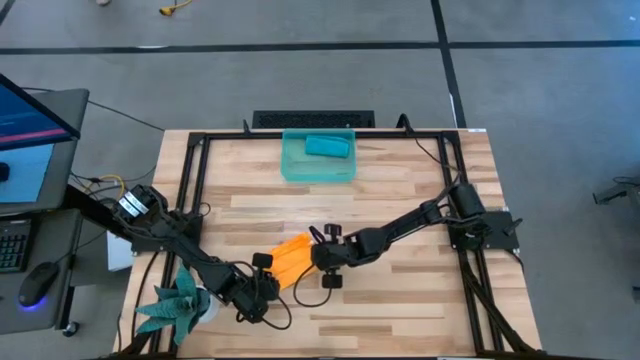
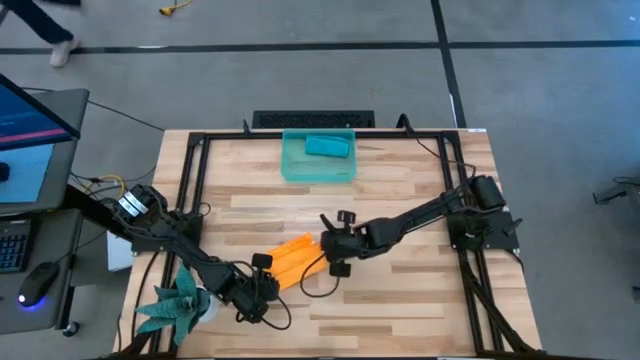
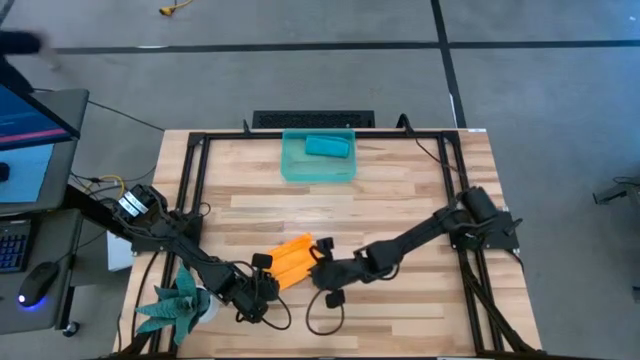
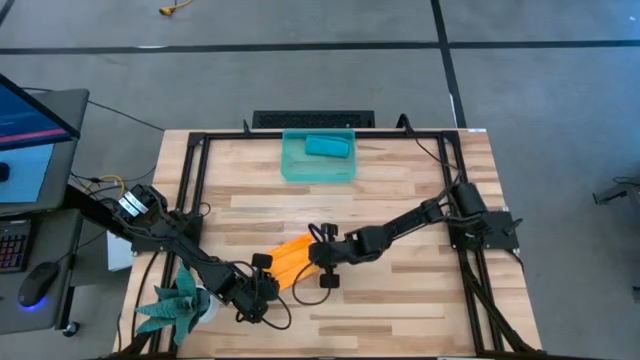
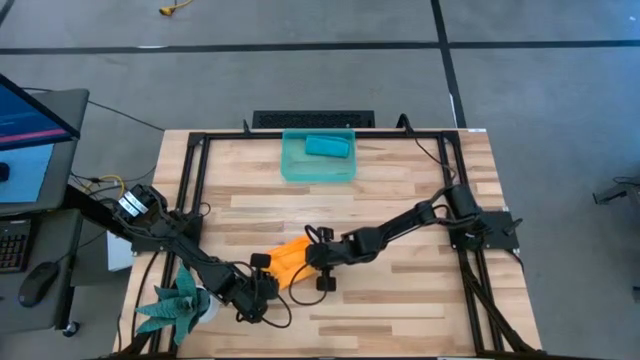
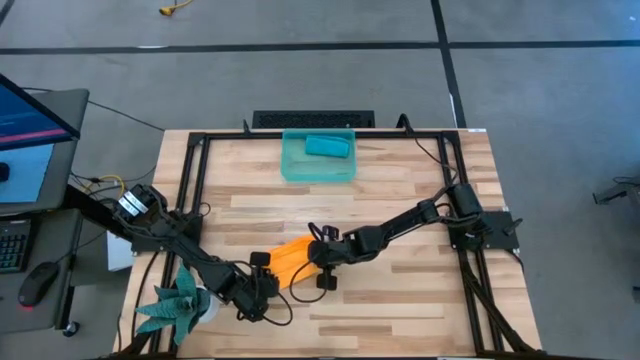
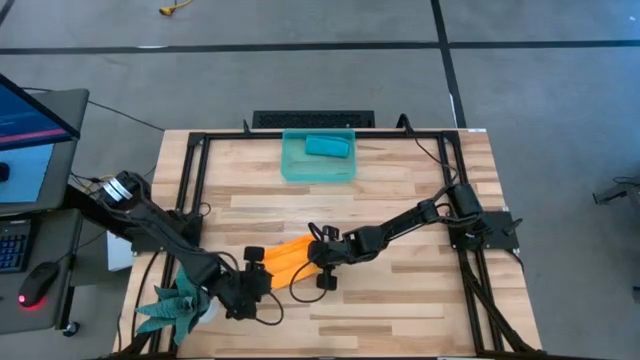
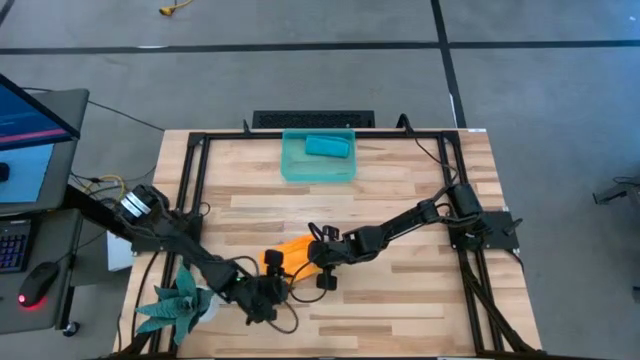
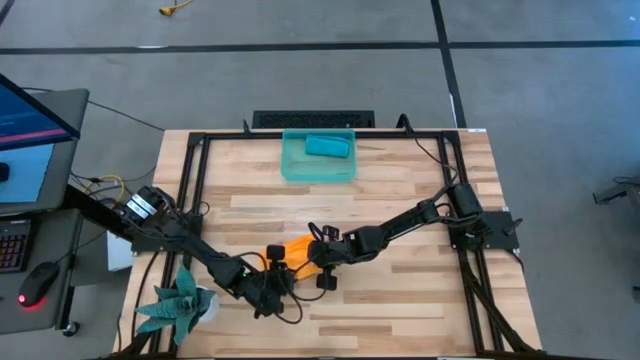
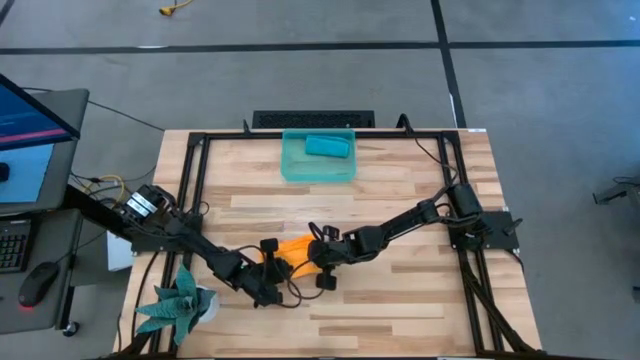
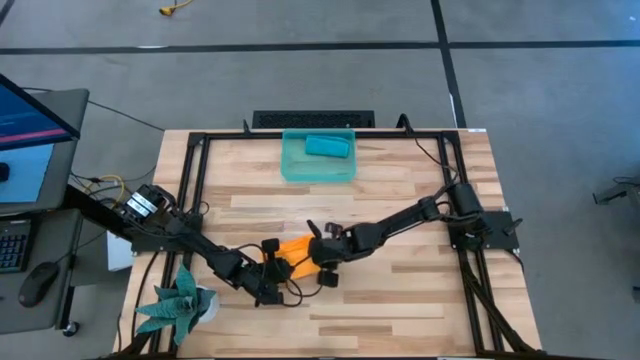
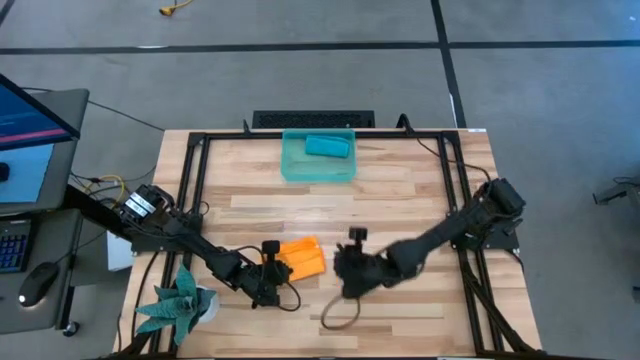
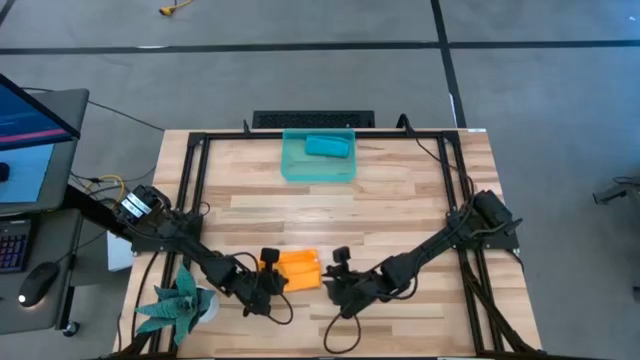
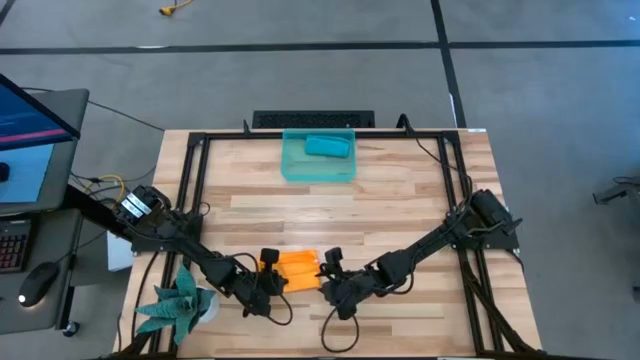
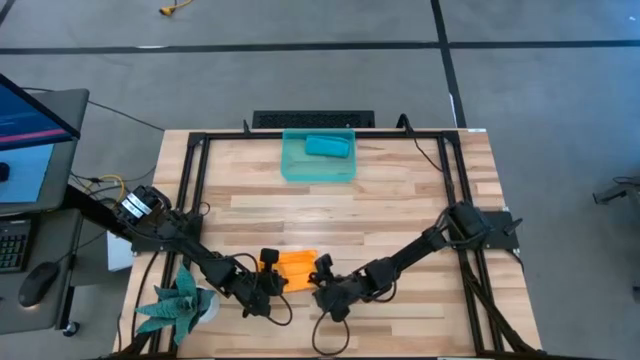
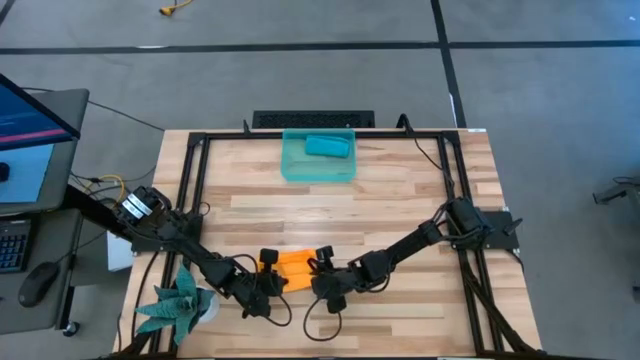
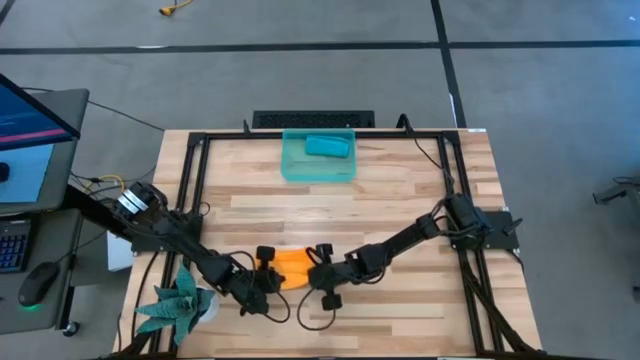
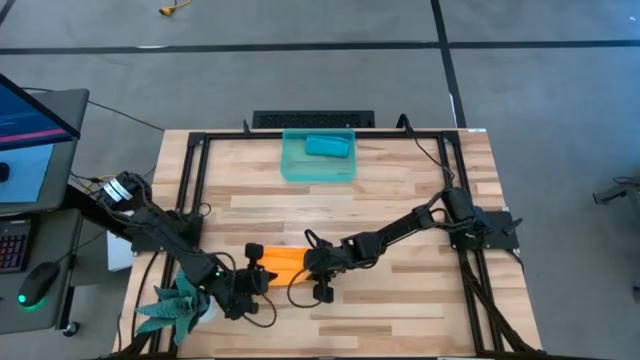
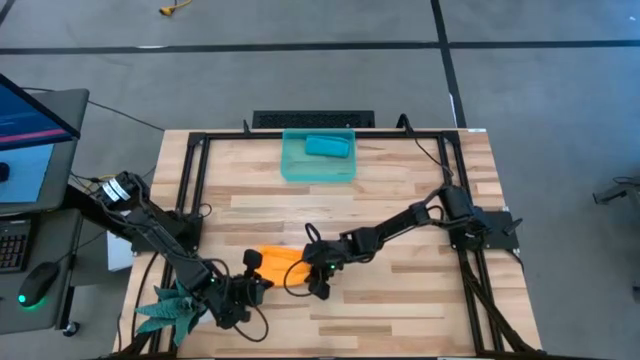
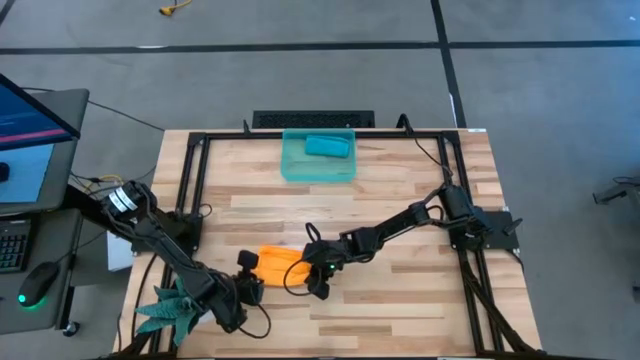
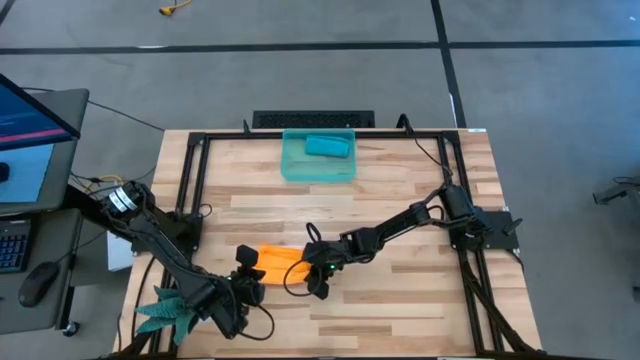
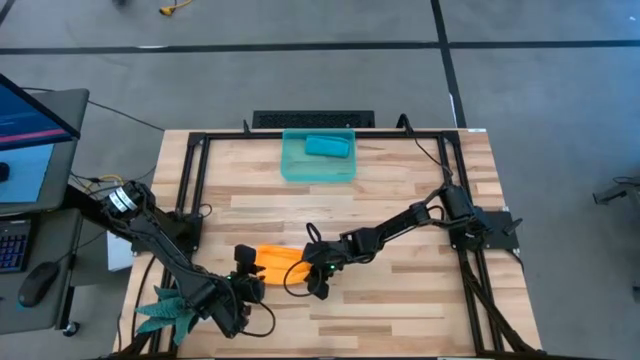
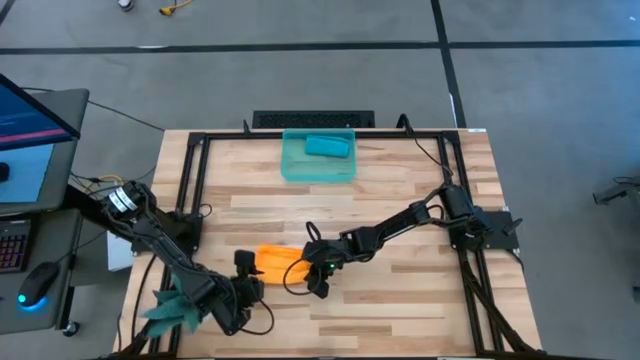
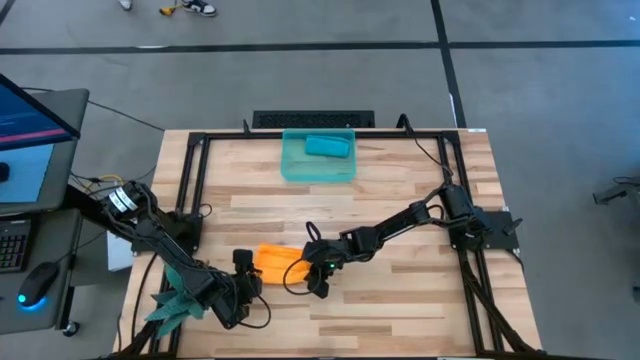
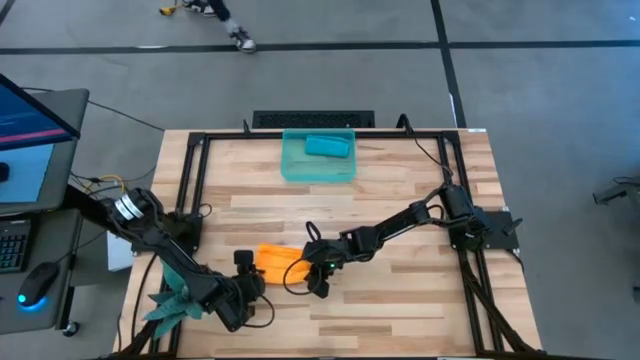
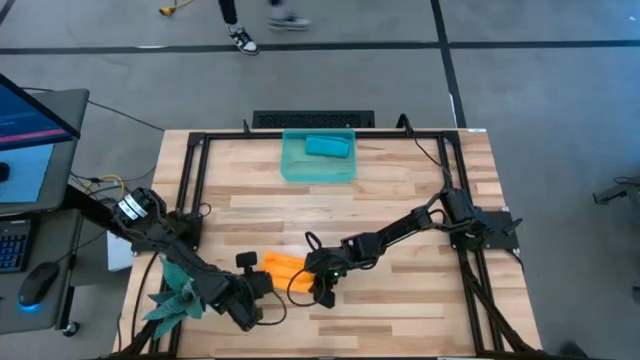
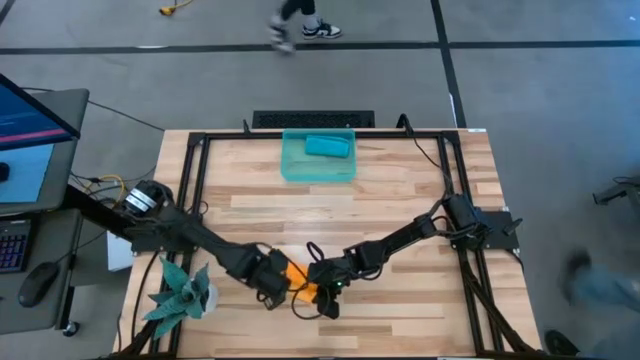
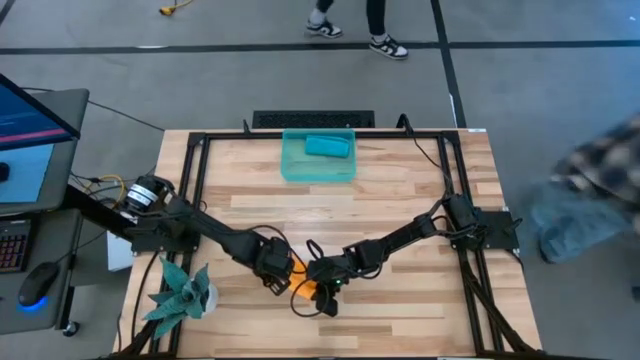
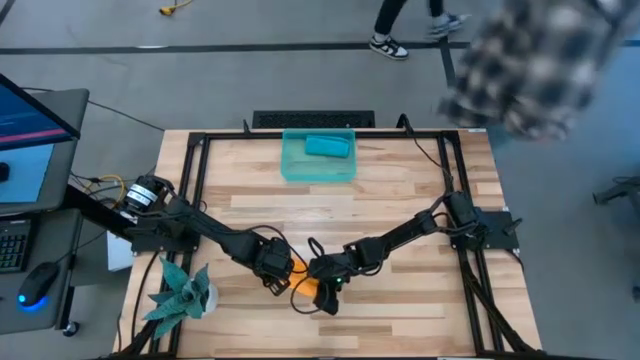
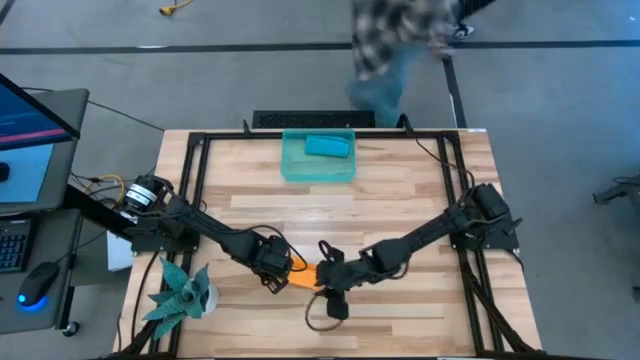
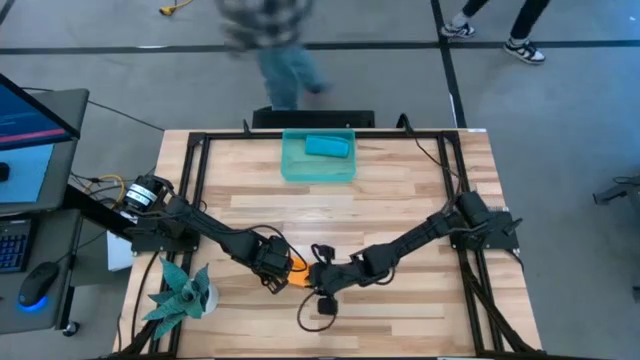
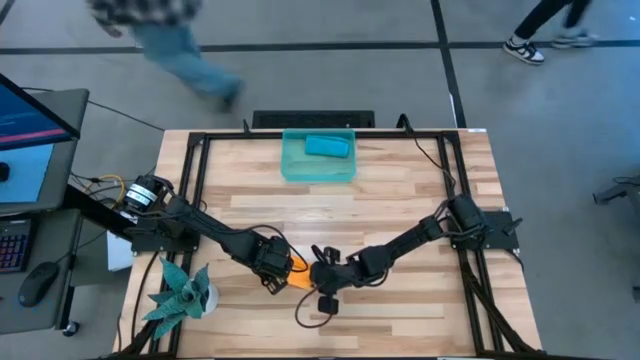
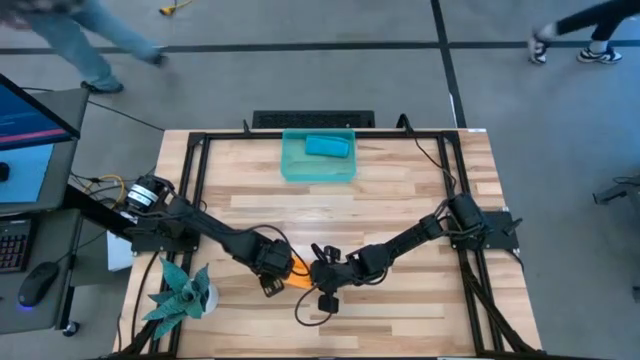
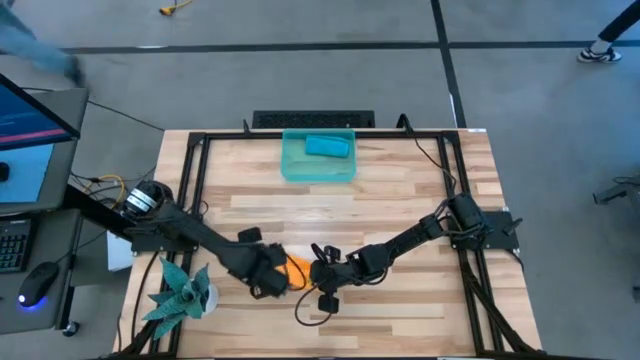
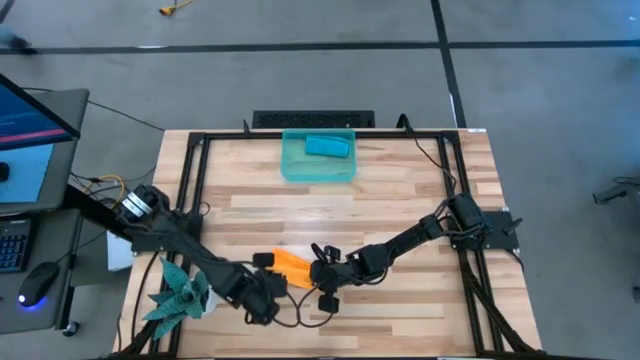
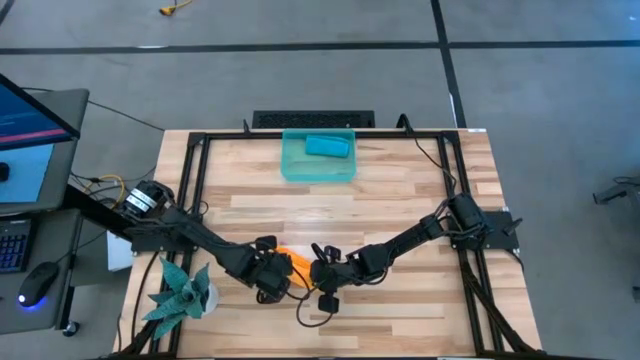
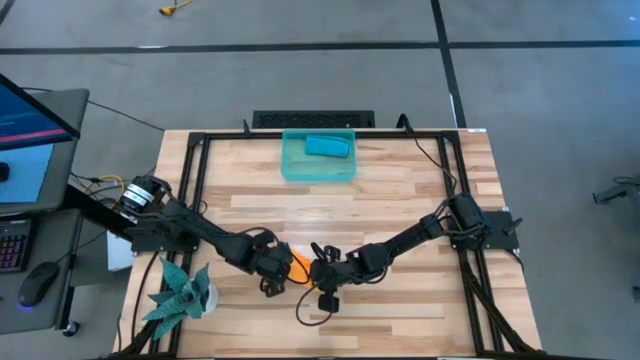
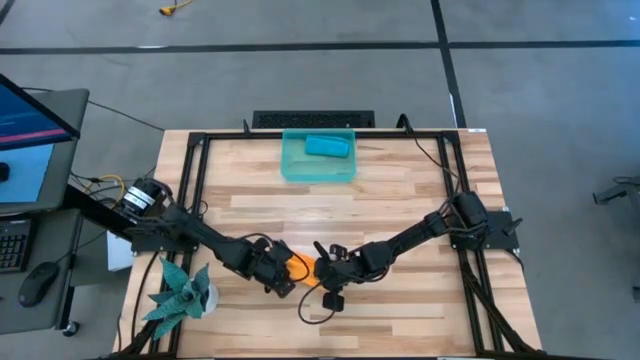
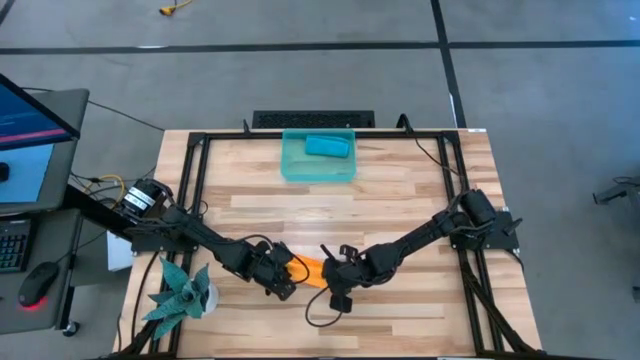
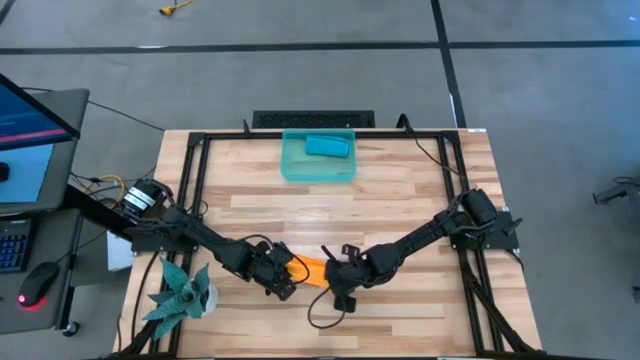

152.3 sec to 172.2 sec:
Task: Roll microfiber towels into tight, uniform cylinder then place into a basket
Roll the yellow microfiber cloth
